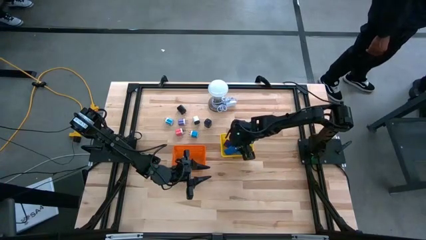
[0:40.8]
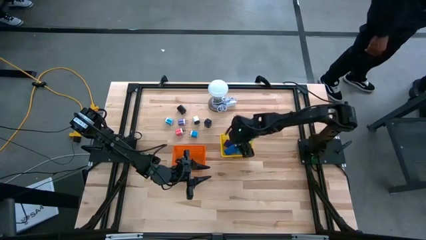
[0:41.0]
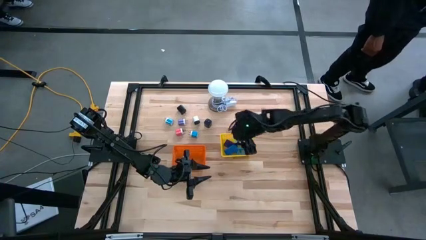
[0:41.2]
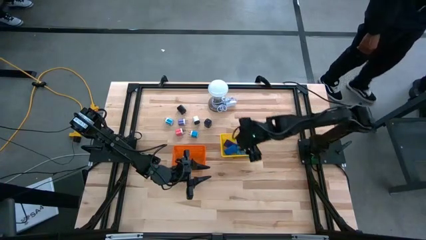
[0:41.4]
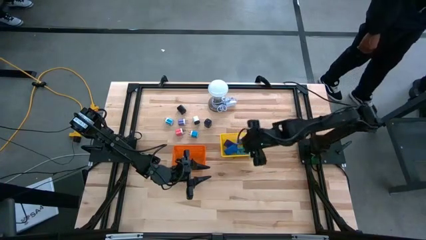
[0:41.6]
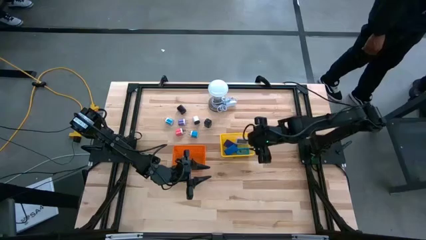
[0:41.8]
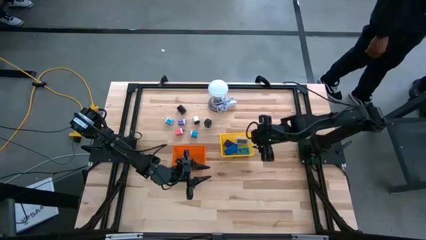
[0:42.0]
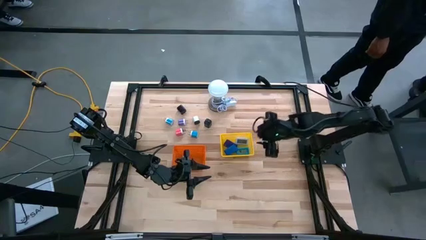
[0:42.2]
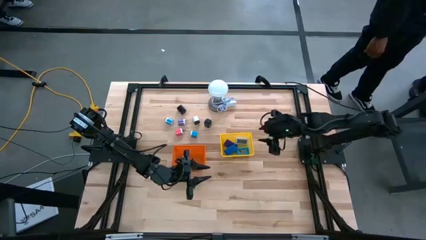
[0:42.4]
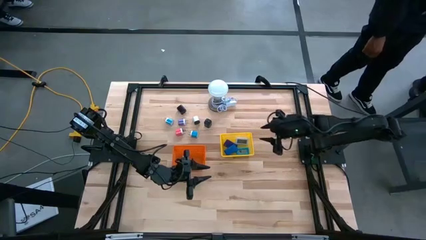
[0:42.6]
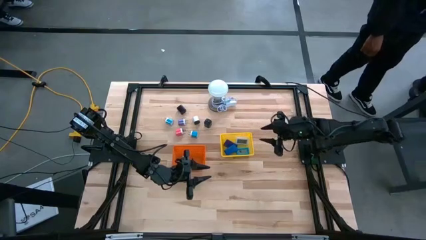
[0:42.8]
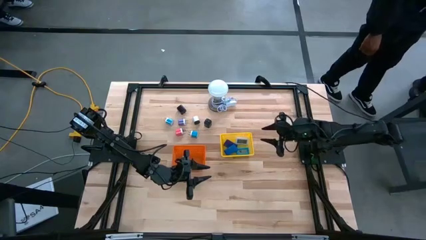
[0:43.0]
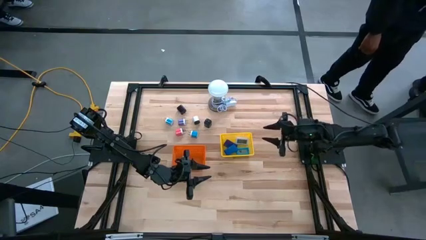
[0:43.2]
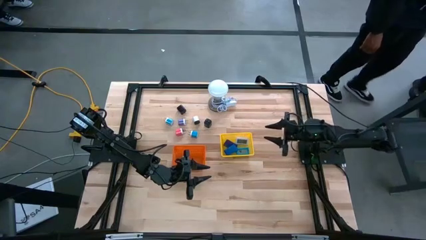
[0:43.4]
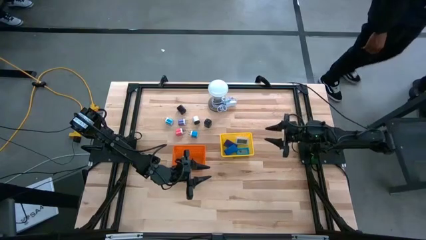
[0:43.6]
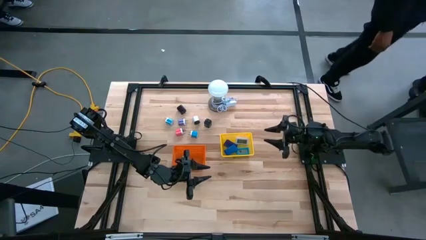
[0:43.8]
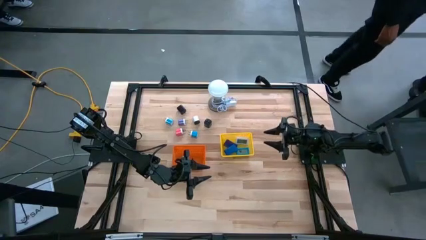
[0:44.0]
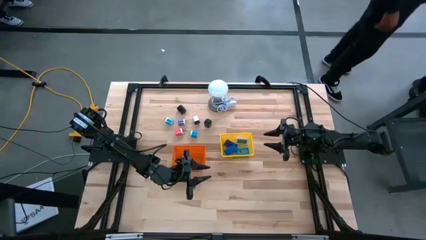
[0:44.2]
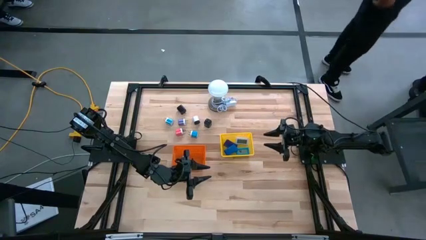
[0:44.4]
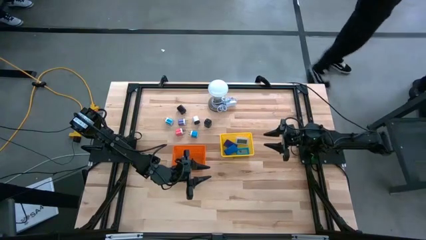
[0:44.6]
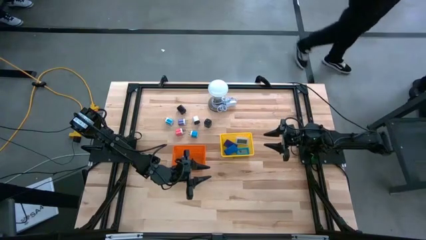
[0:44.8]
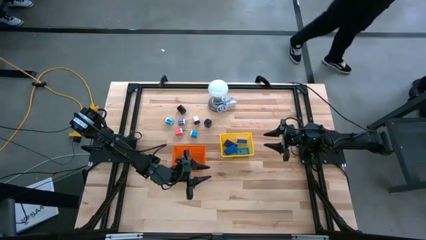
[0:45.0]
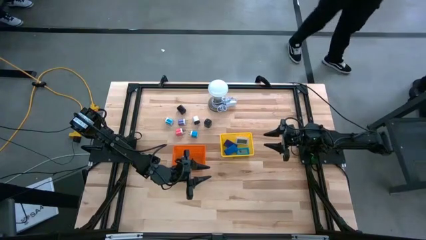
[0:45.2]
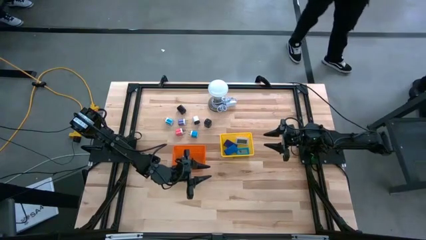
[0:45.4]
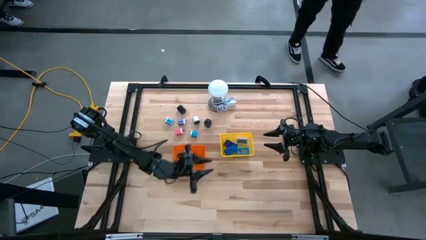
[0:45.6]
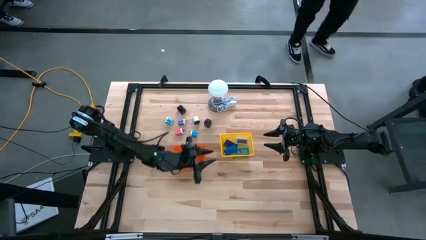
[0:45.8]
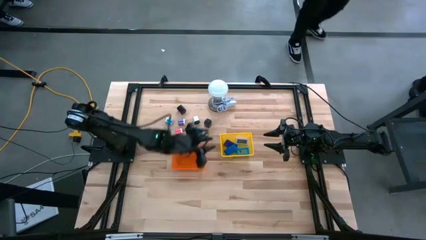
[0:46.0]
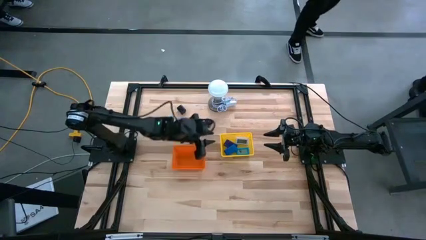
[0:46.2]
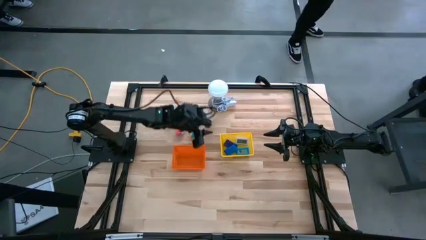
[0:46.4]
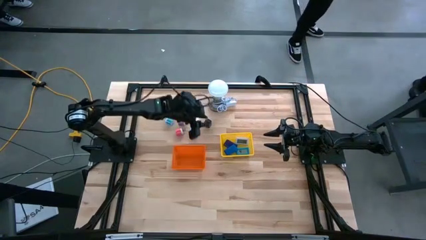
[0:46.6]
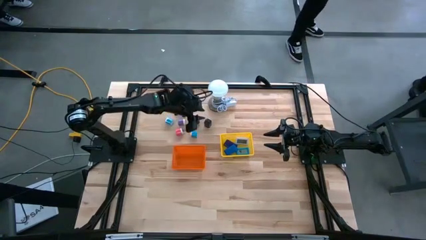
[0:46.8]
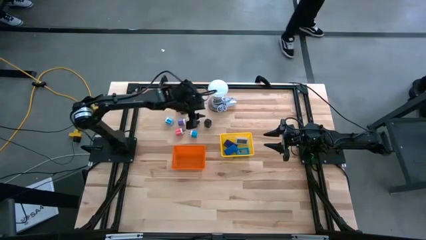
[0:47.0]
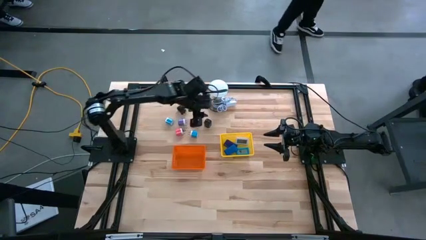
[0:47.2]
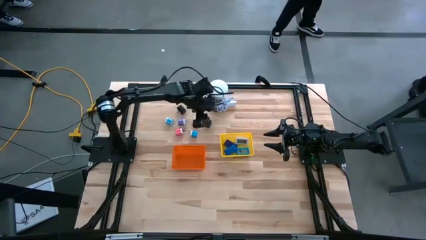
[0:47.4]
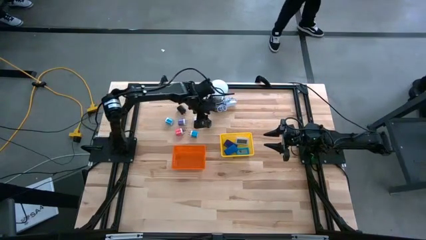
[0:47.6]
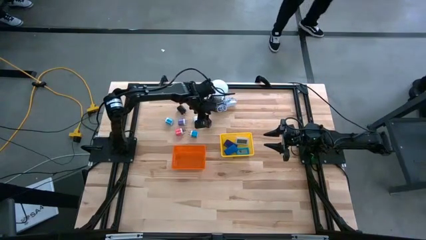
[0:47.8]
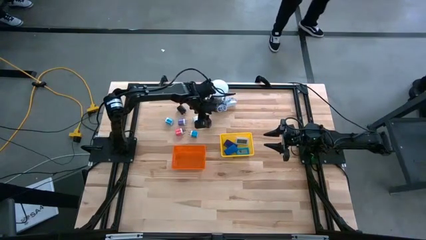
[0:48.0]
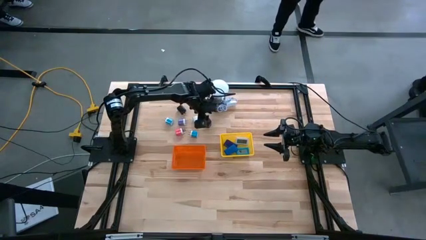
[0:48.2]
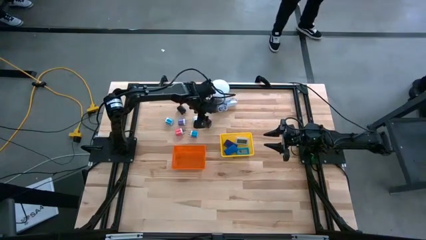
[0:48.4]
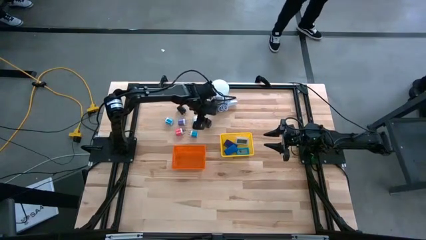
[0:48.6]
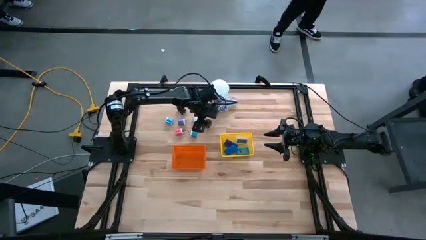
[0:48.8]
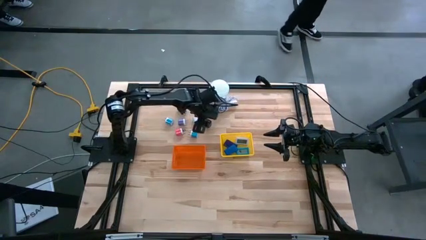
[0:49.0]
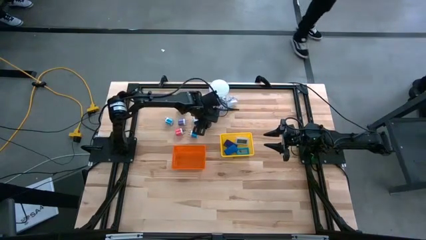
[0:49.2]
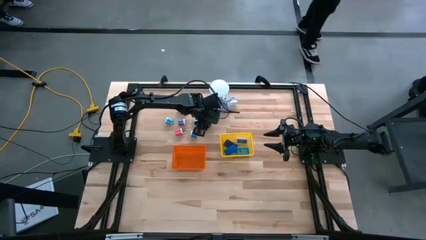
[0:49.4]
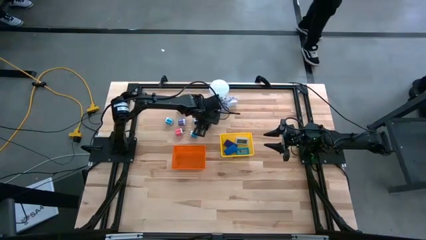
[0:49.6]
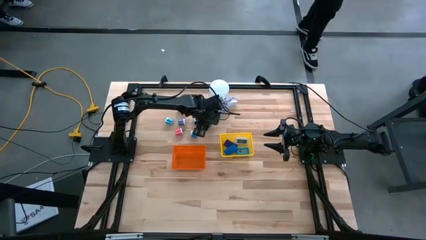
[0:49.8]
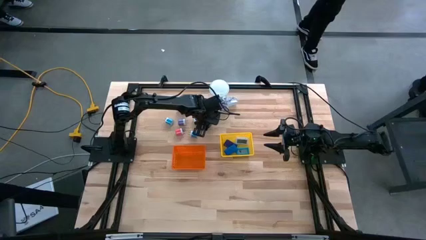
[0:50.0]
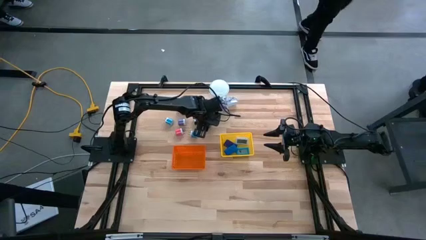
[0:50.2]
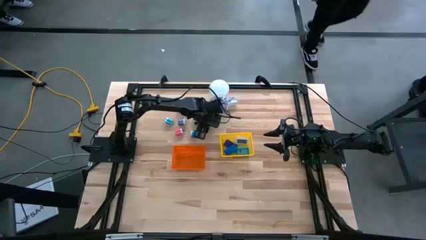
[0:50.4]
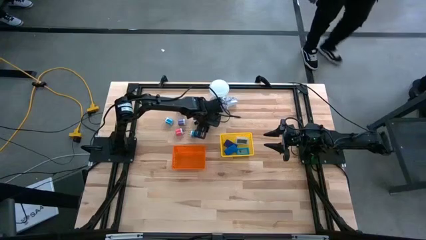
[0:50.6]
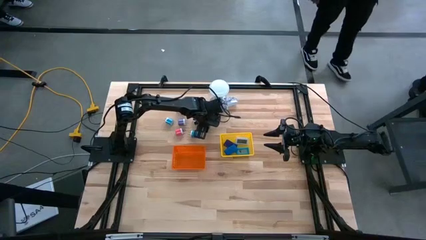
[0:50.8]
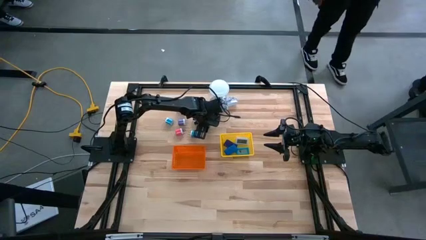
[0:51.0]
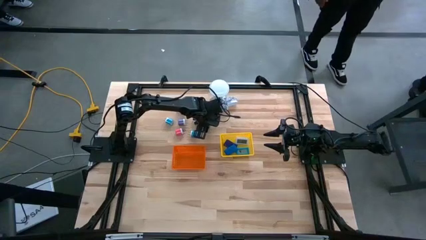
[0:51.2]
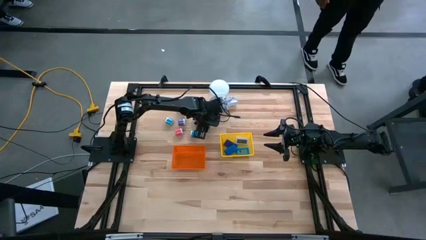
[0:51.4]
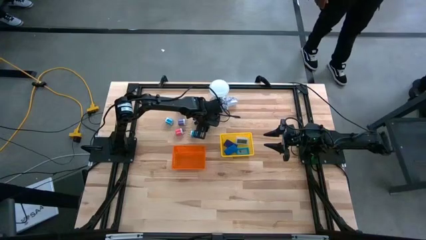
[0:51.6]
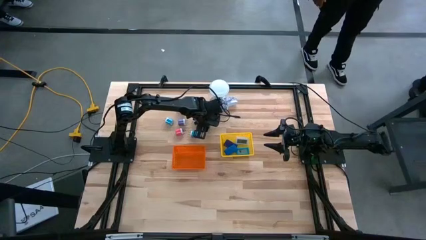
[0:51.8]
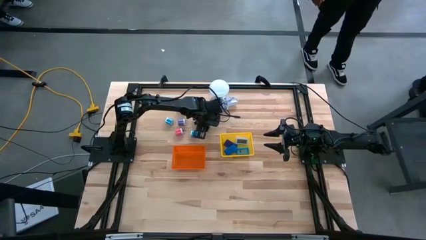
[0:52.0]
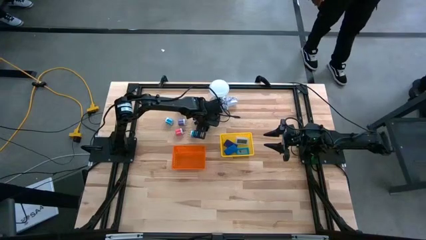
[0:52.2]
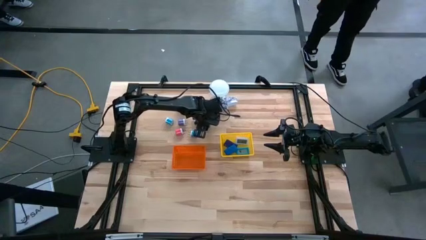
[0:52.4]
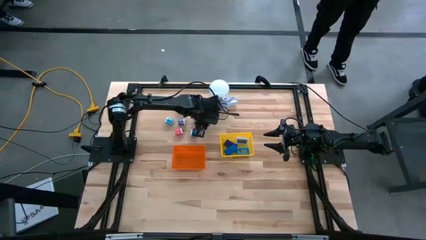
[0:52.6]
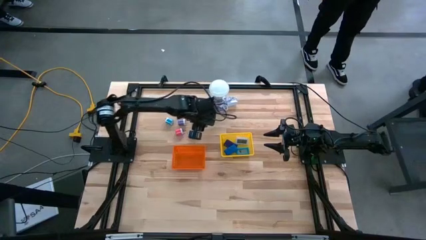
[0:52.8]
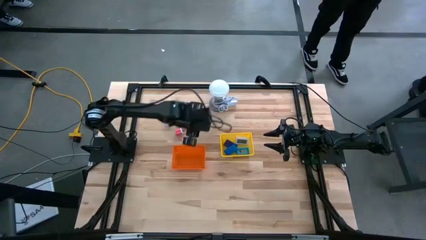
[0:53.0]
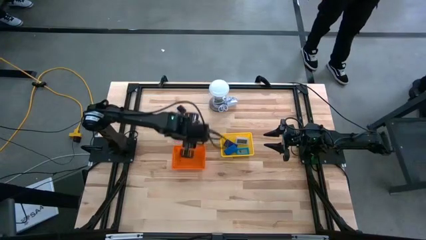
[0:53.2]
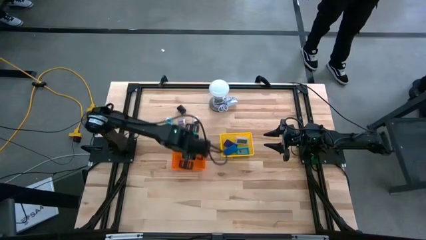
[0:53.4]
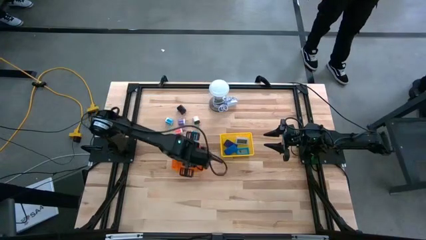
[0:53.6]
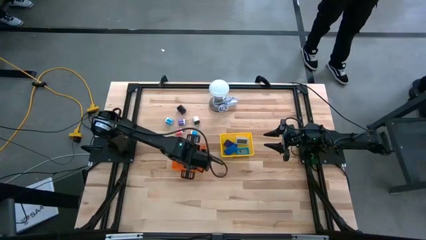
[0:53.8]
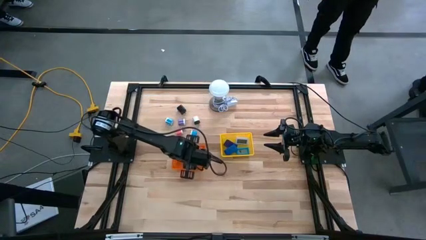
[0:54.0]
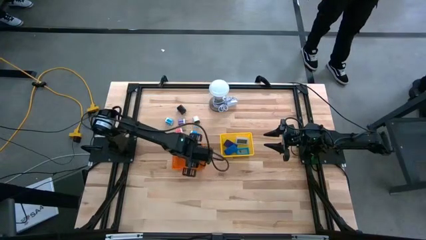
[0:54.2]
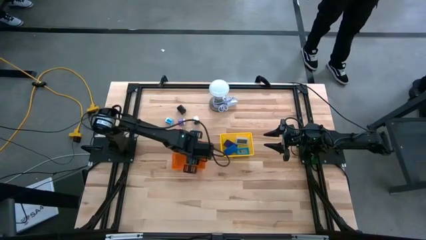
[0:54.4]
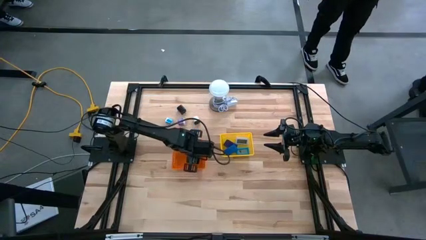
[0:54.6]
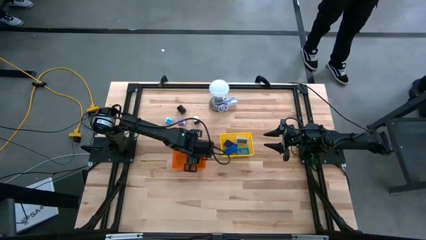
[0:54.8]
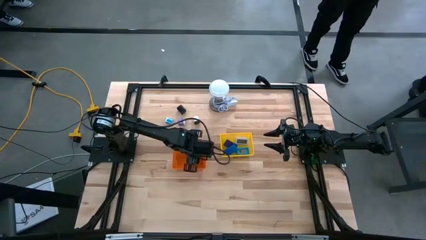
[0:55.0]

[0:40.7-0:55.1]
Task: Pick & Place Office items
Put the right black charger adapter into the orange bin

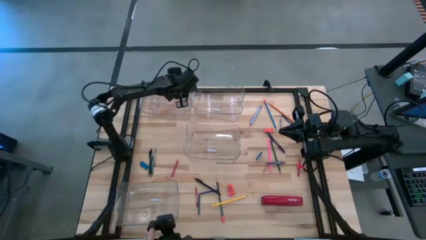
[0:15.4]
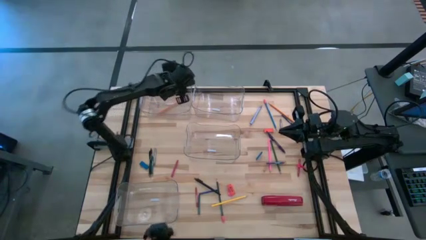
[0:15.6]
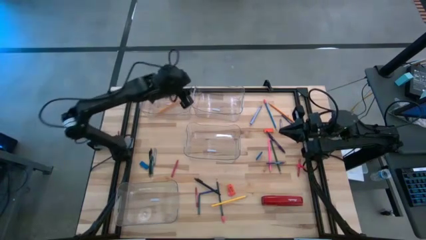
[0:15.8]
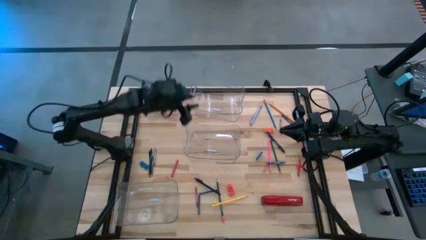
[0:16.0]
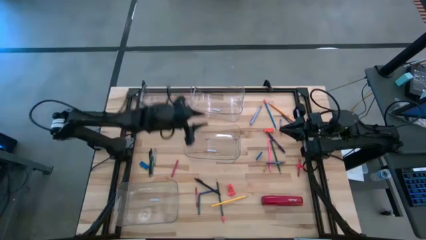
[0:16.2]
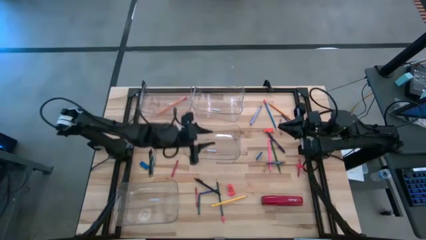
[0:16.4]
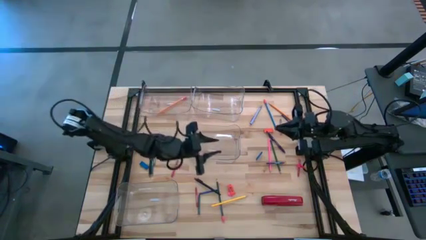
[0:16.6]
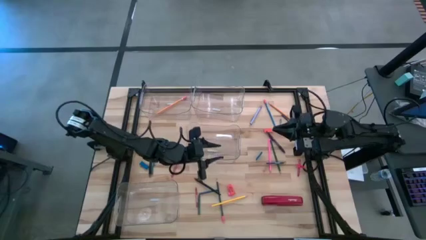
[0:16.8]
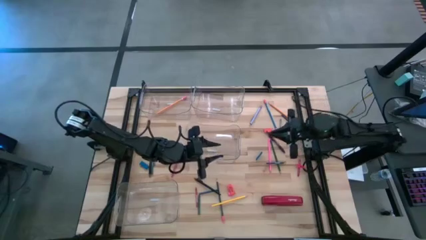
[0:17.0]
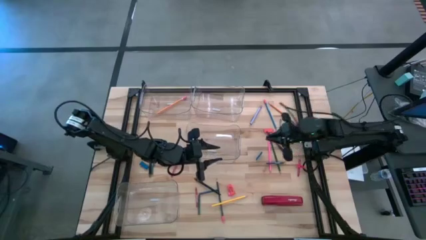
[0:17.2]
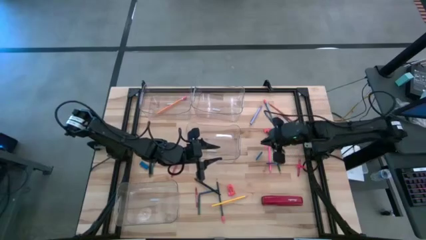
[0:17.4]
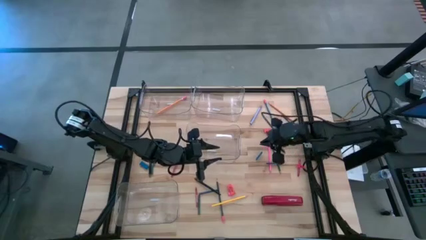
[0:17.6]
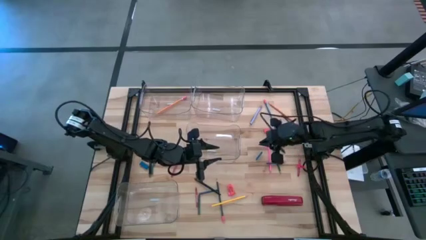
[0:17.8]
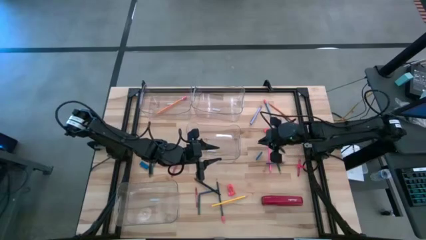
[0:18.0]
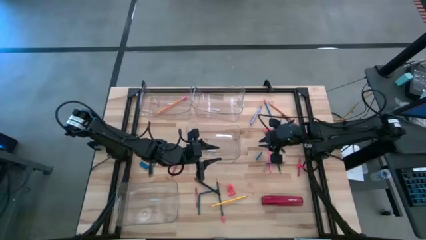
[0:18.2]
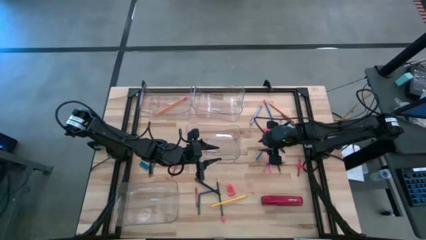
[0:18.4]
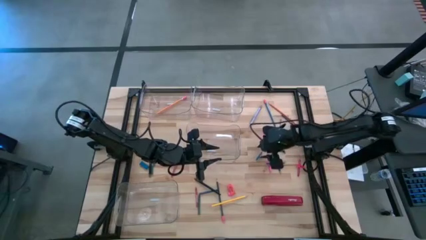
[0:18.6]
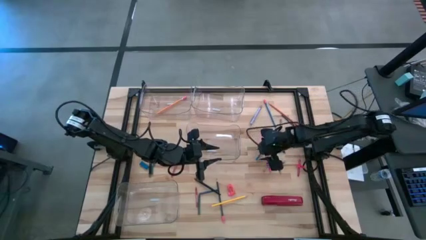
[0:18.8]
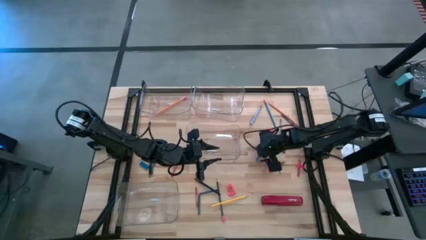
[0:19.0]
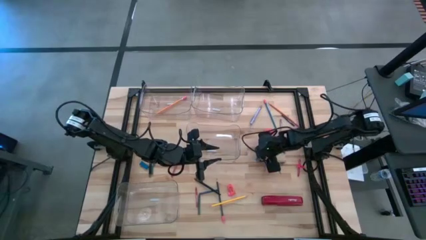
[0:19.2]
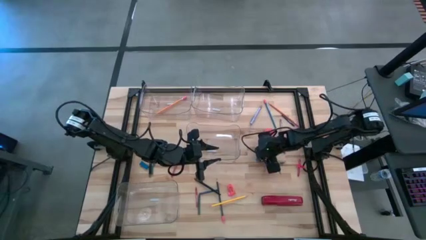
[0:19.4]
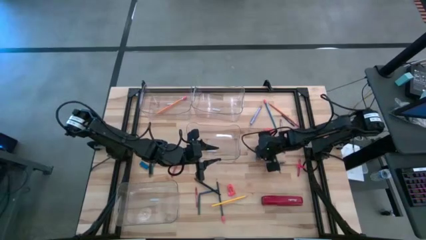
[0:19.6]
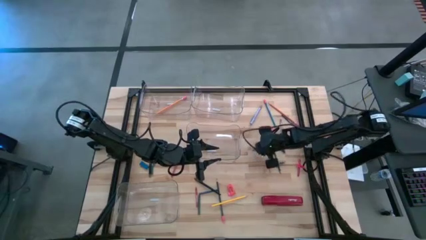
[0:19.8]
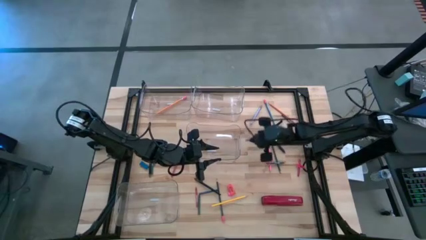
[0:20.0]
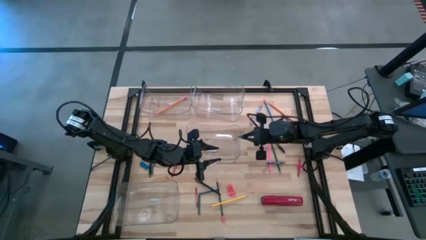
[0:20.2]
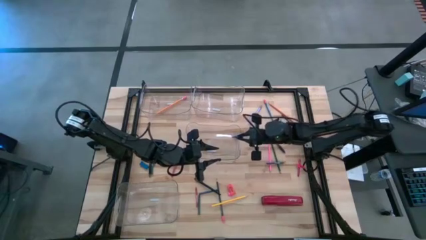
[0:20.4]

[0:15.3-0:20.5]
Task: Sort crayons/erasers/pens/pencils in bins
Put the right blue eraser into the middle transparent bin
